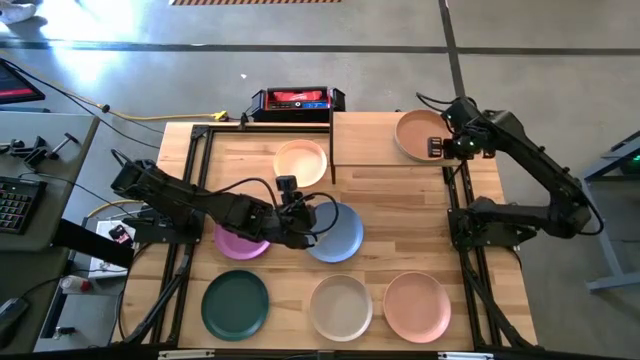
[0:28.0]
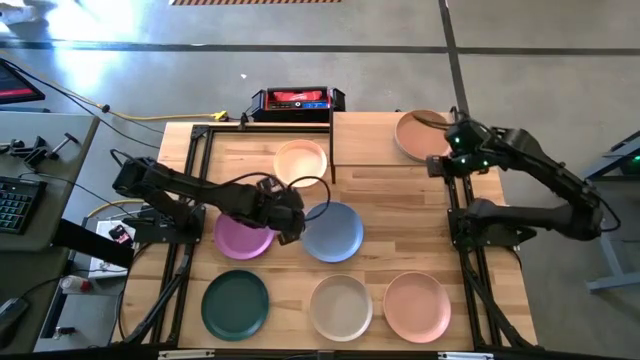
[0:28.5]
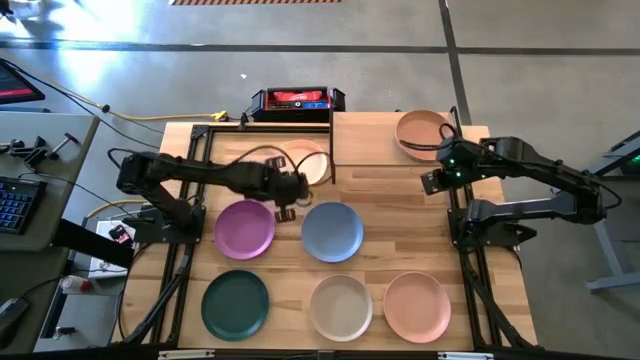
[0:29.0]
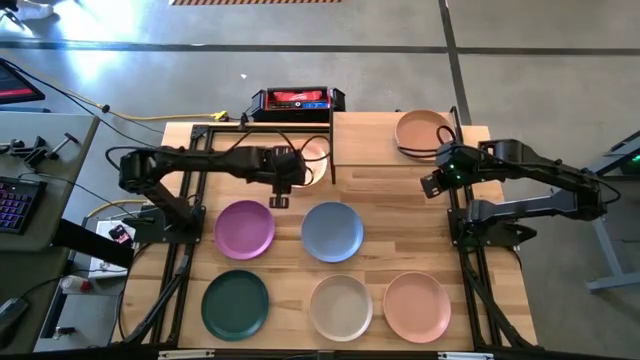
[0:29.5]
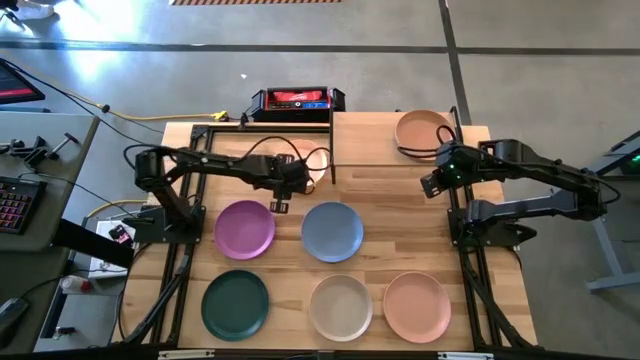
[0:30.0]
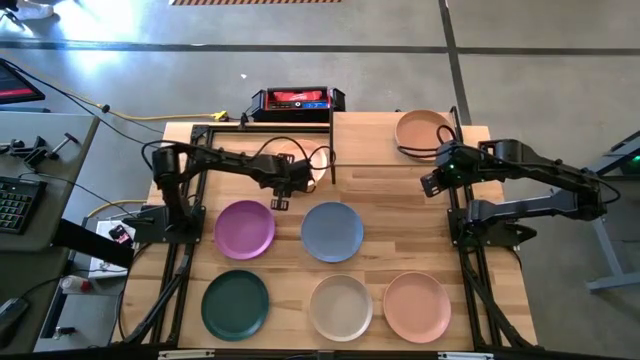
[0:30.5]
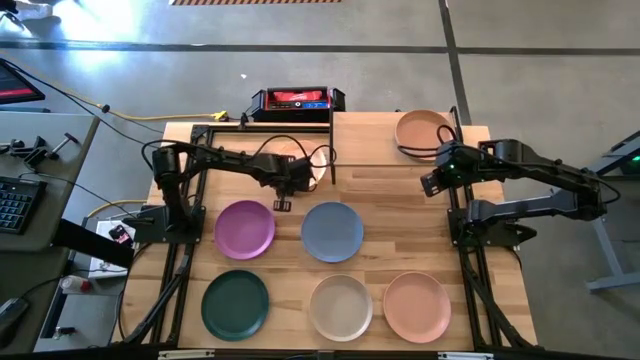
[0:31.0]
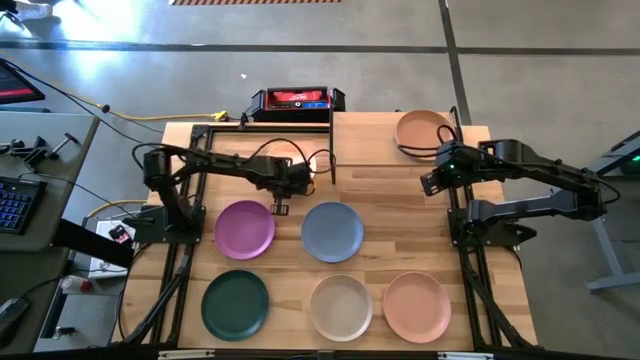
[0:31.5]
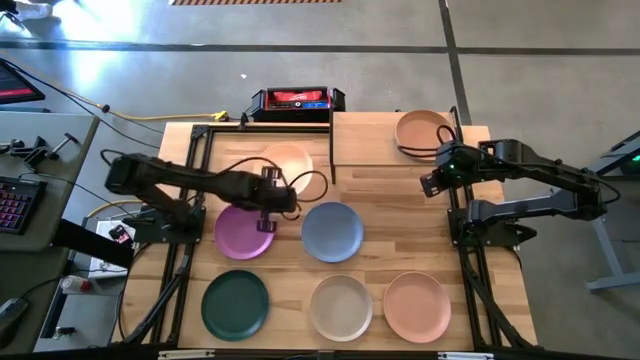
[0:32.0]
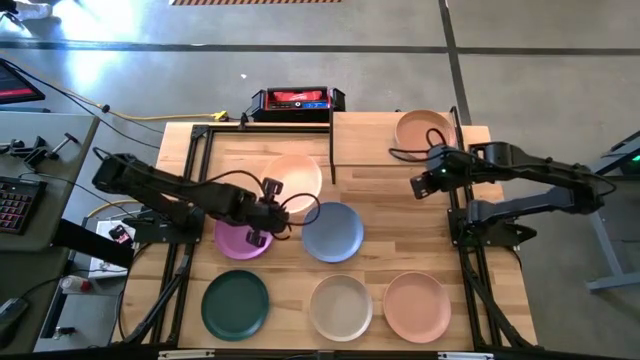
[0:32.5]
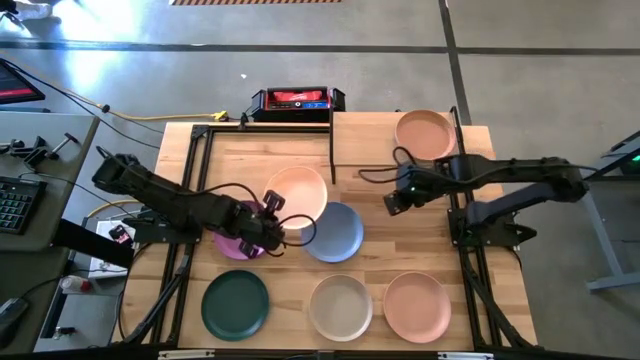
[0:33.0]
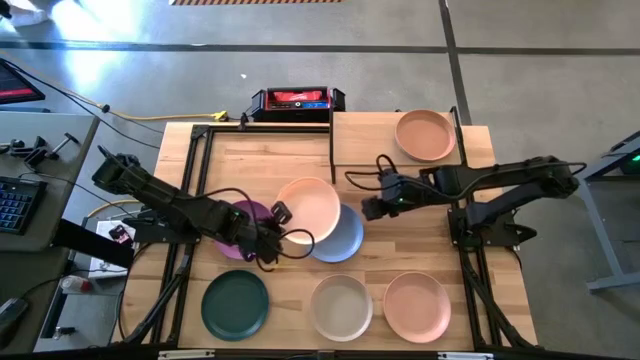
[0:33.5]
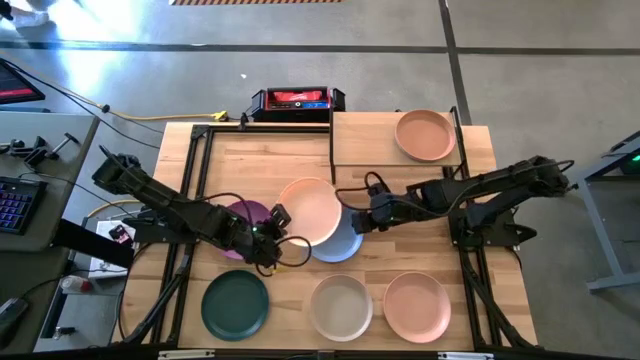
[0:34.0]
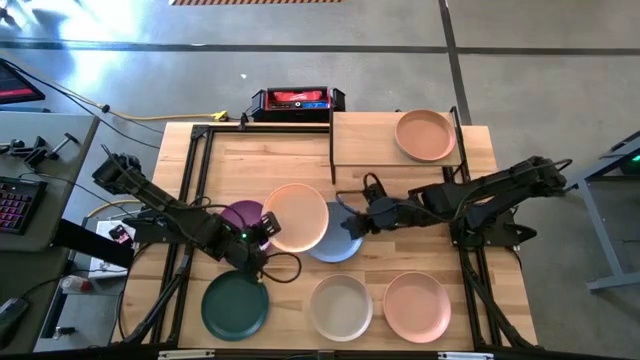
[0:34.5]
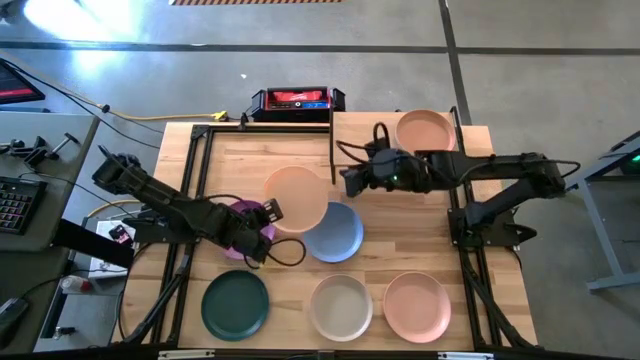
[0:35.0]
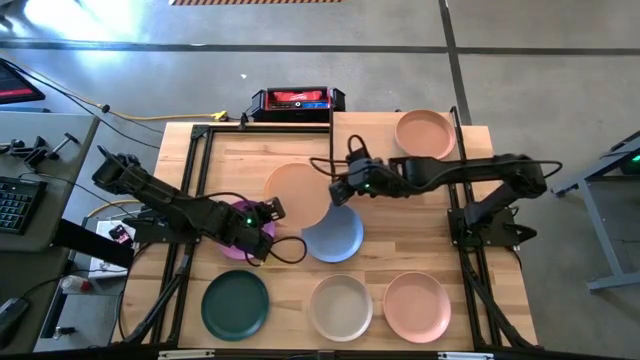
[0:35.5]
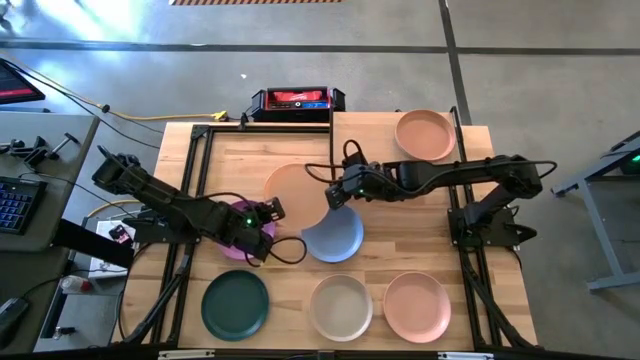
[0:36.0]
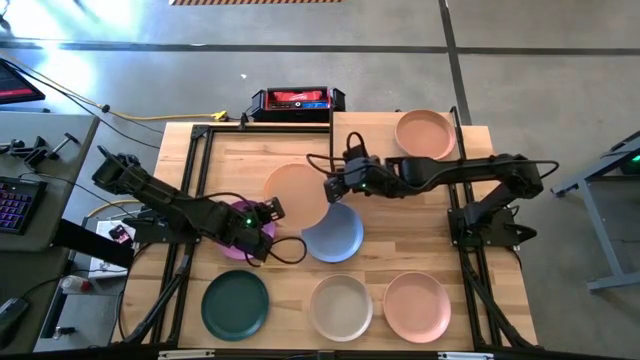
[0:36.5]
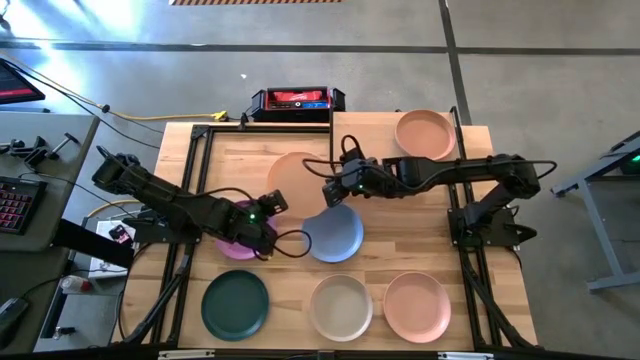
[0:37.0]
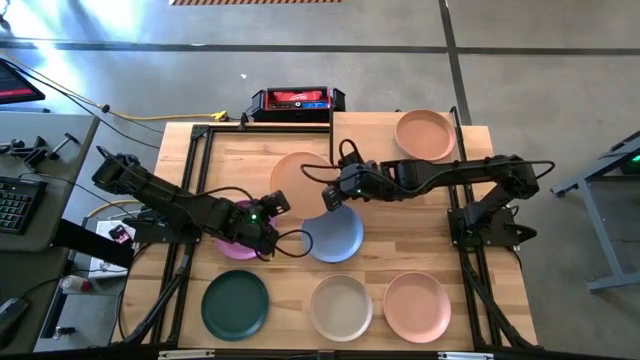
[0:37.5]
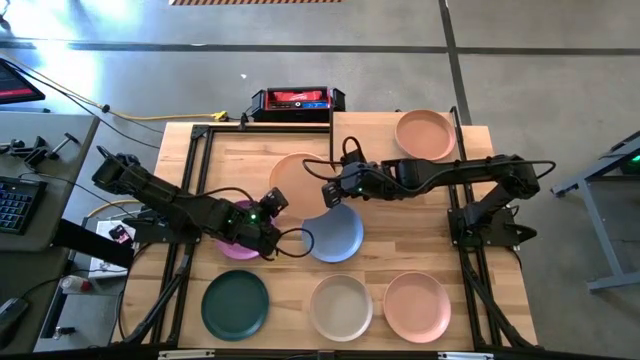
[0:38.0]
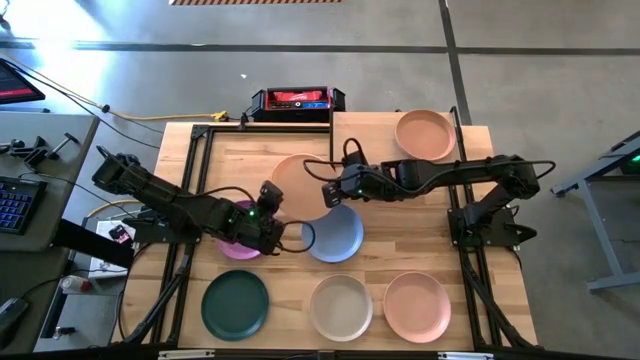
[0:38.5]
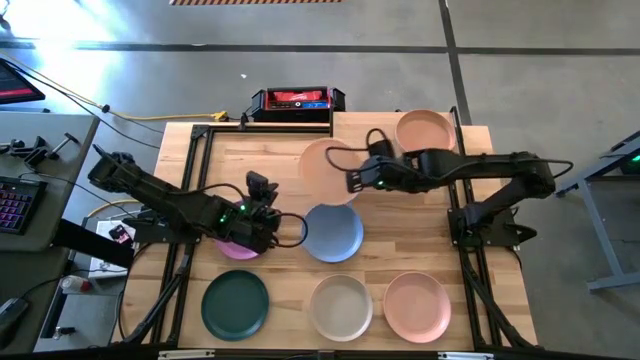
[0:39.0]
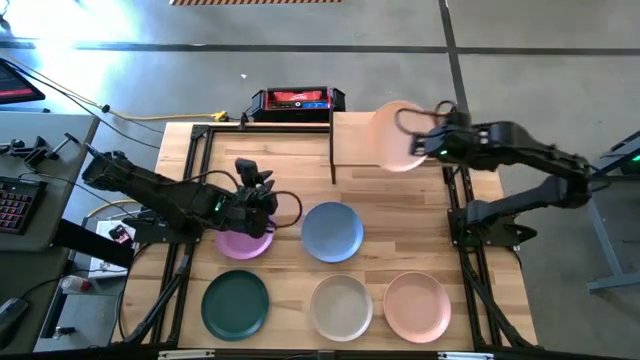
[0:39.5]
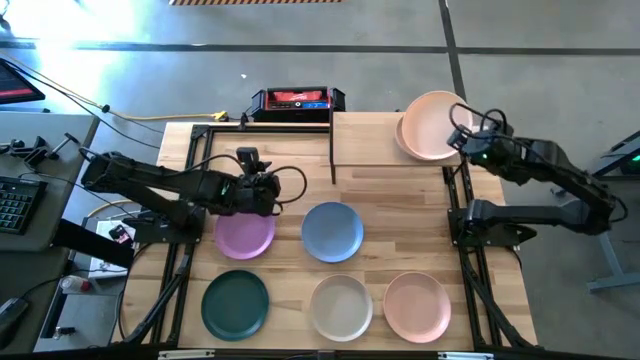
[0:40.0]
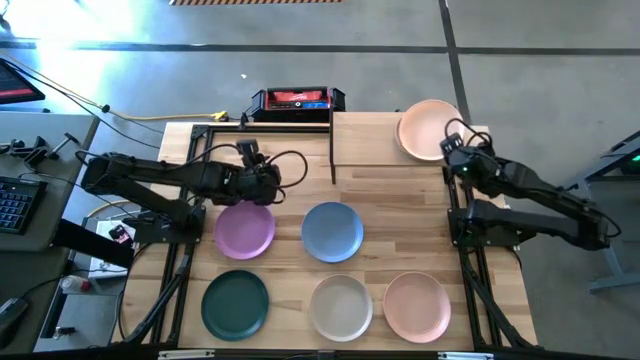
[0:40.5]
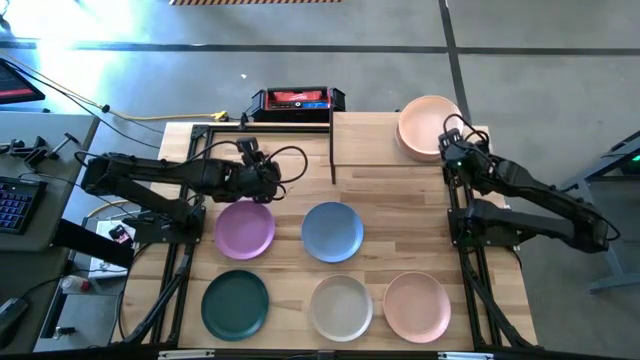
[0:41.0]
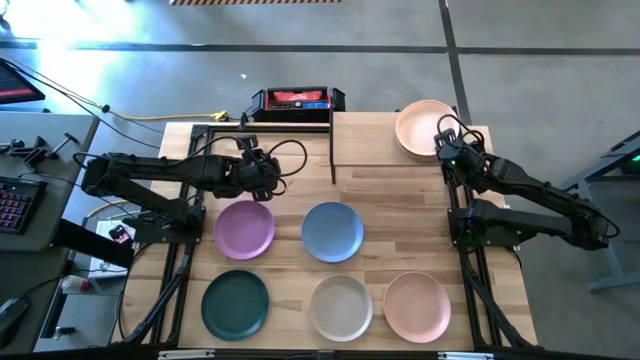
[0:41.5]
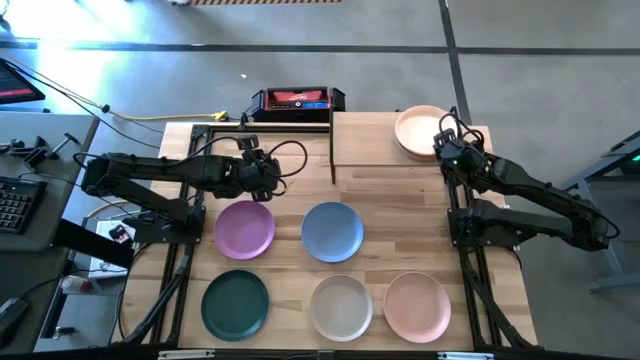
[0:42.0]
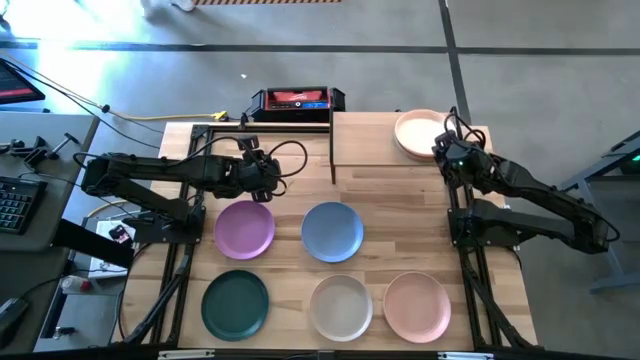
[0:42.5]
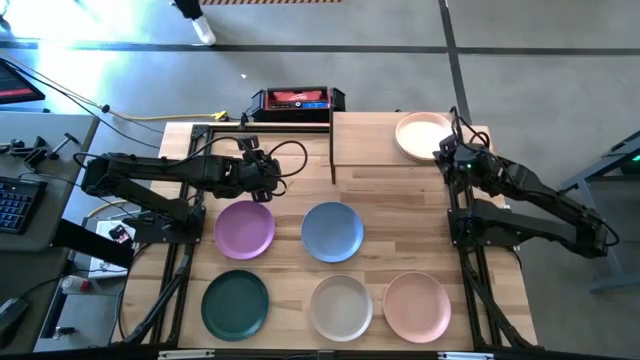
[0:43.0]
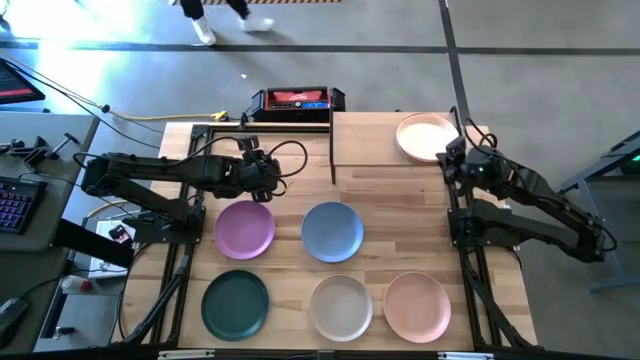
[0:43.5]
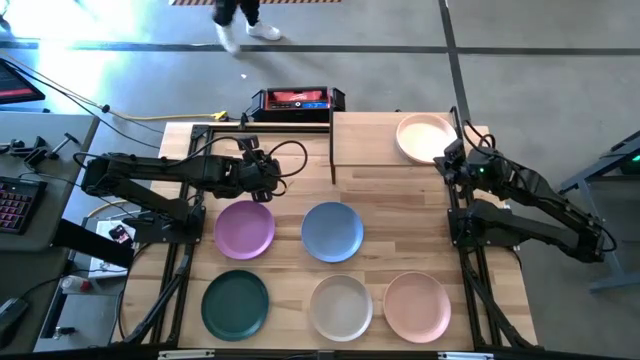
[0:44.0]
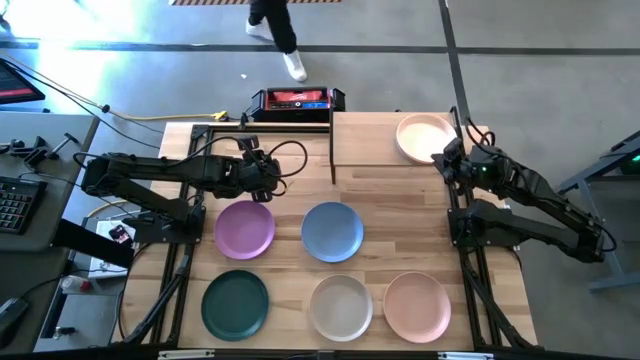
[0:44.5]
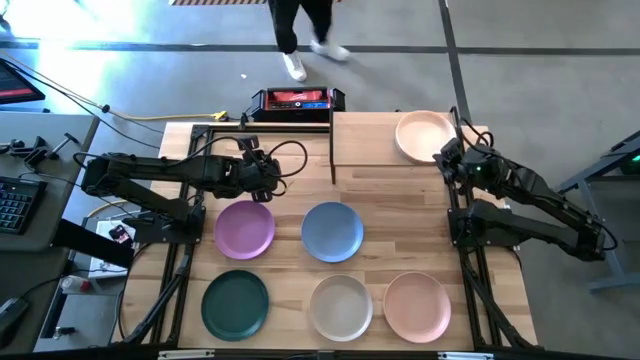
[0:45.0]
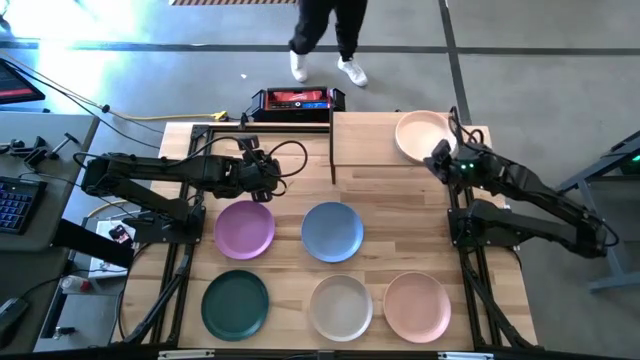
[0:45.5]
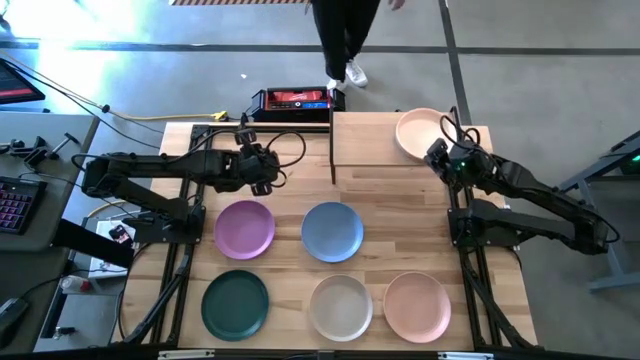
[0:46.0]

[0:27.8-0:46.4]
Task: Place and stack plates onto a shelf
Stack the light orange plate on top of the dark orange stacked plates on the shelf

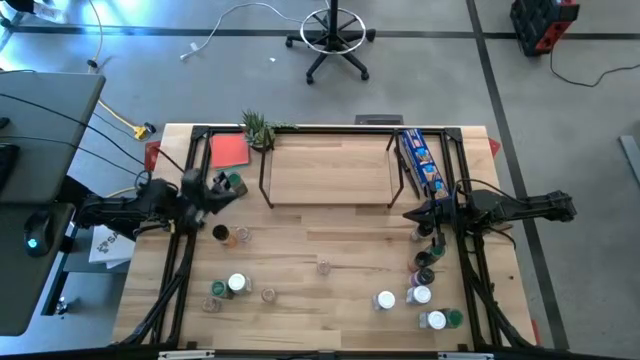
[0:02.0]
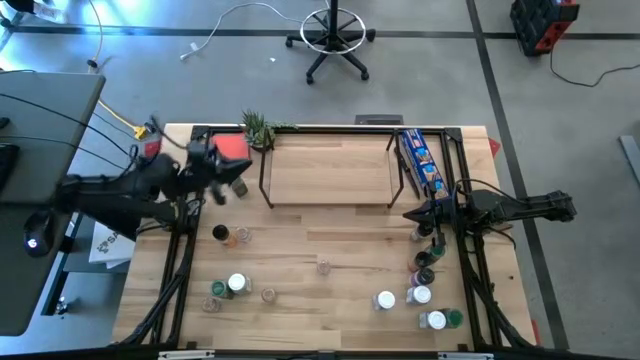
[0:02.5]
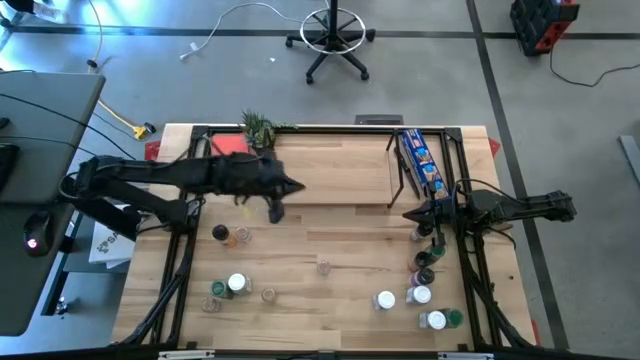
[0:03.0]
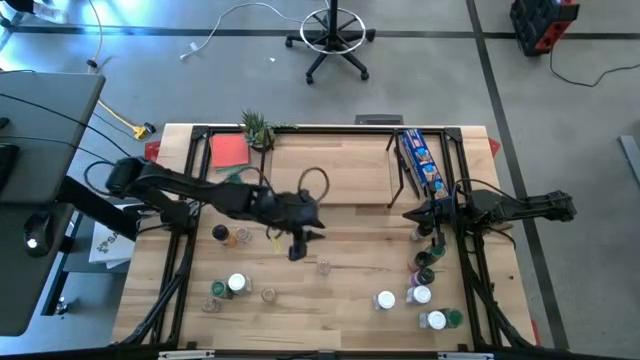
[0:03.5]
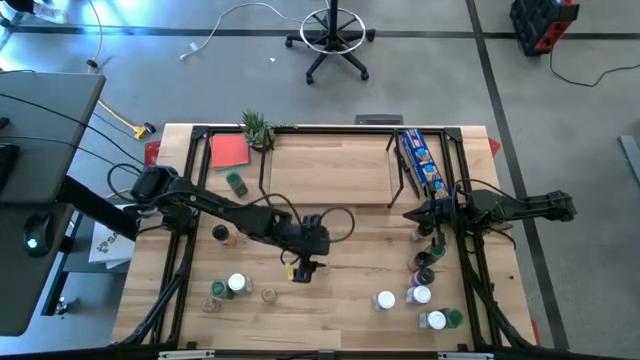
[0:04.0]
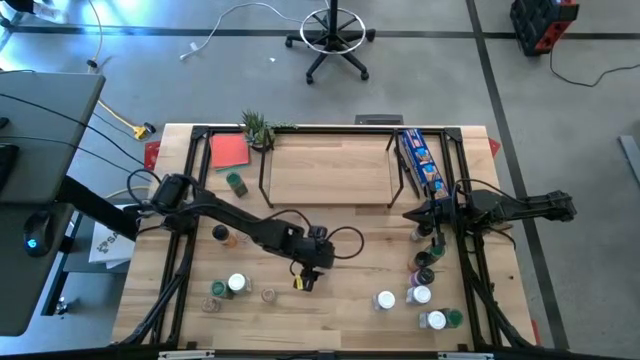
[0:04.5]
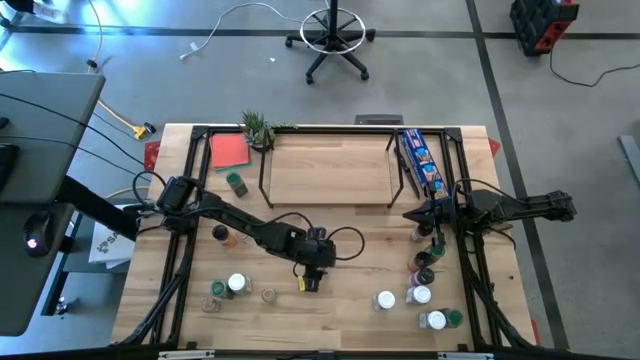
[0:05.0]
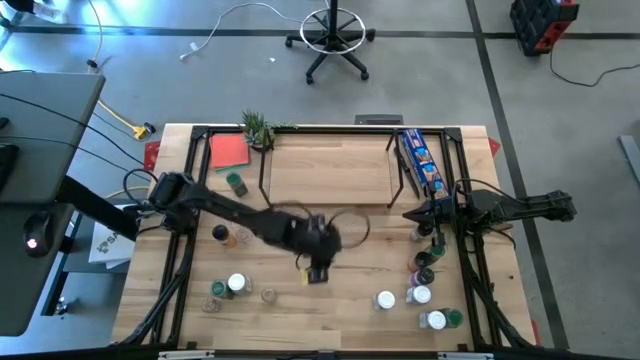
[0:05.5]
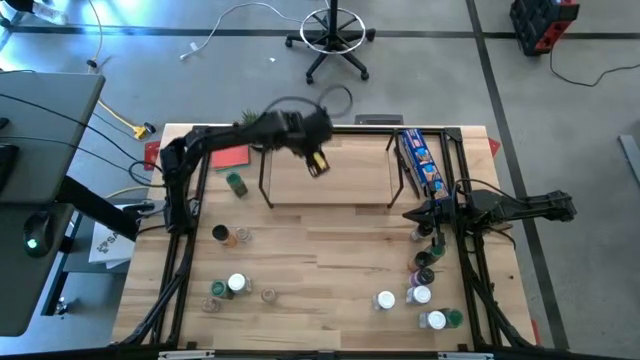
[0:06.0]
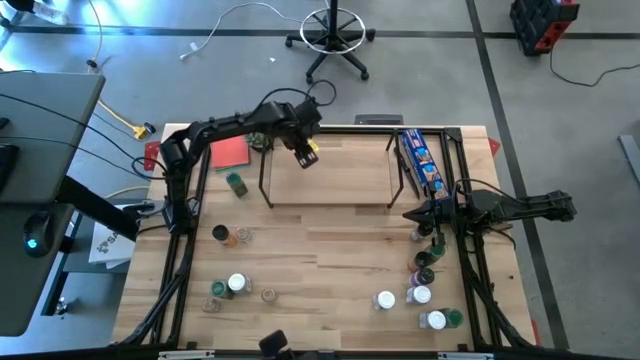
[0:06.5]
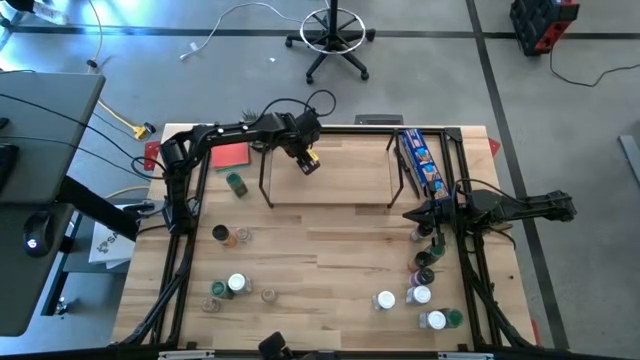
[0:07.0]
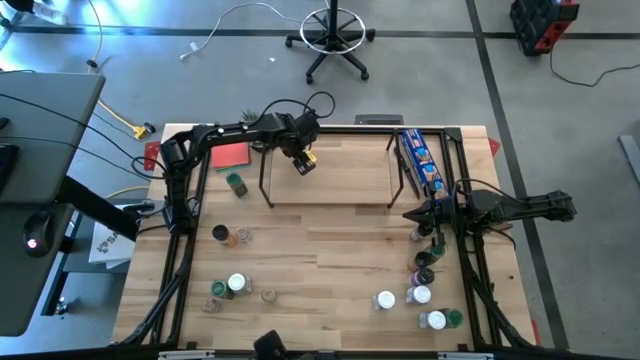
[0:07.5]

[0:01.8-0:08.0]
Task: Shelf spices
Put the brown seasoning bottle on the shelf
